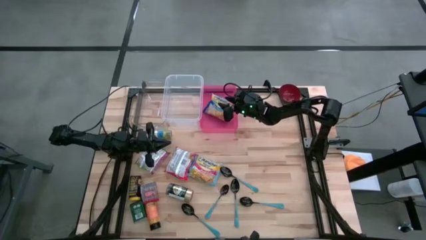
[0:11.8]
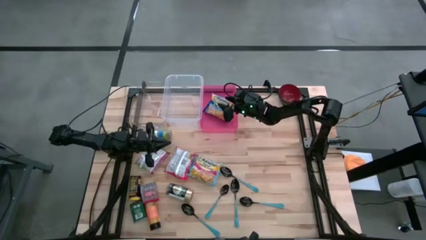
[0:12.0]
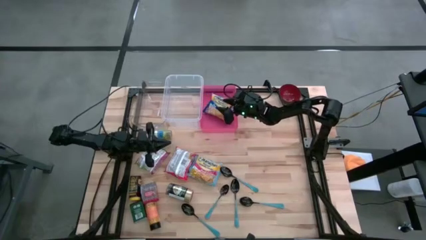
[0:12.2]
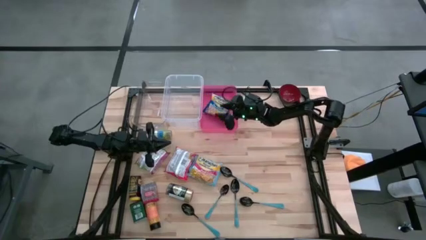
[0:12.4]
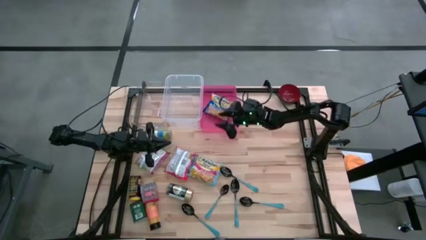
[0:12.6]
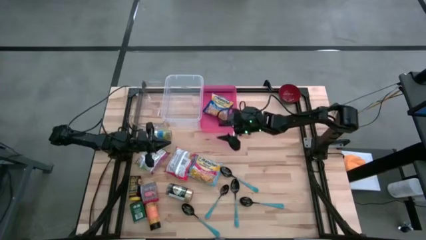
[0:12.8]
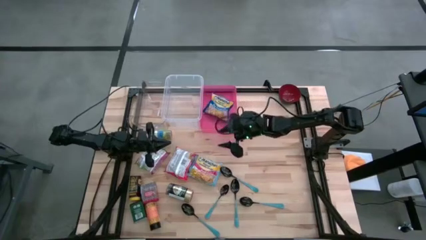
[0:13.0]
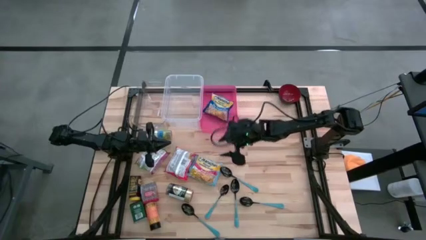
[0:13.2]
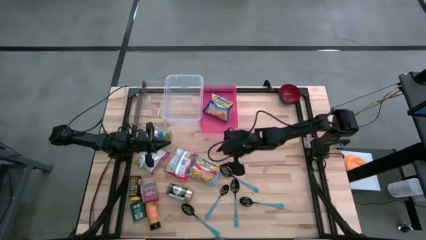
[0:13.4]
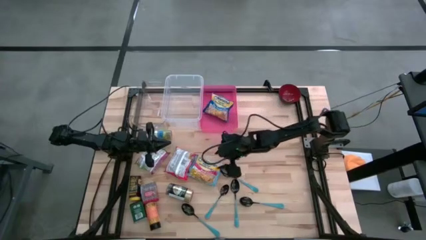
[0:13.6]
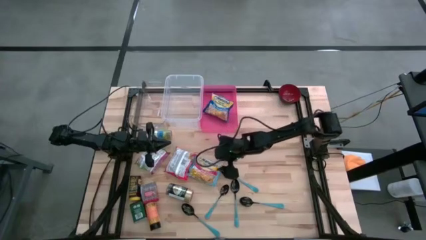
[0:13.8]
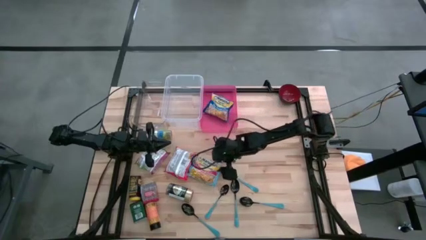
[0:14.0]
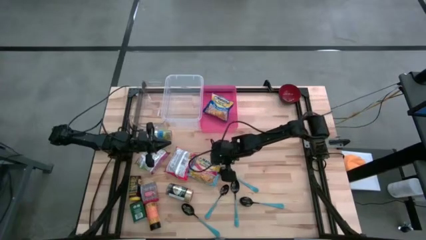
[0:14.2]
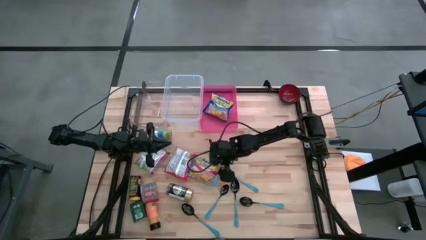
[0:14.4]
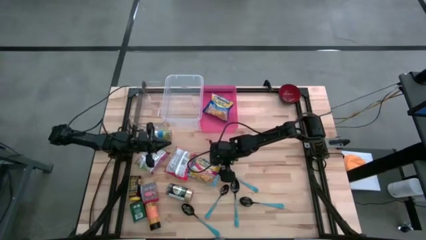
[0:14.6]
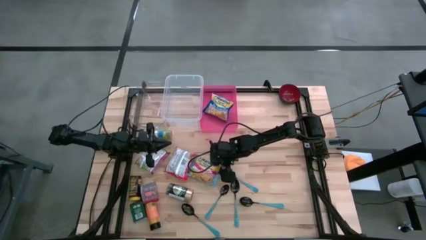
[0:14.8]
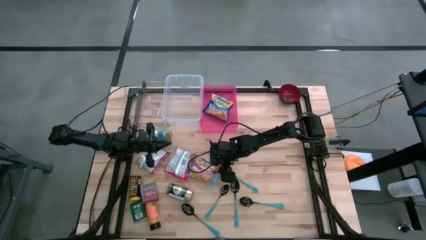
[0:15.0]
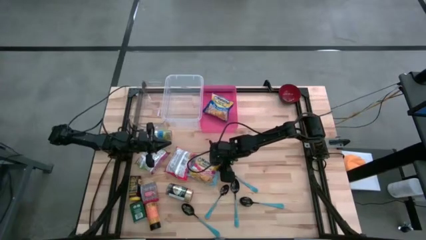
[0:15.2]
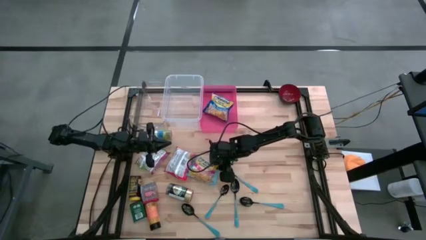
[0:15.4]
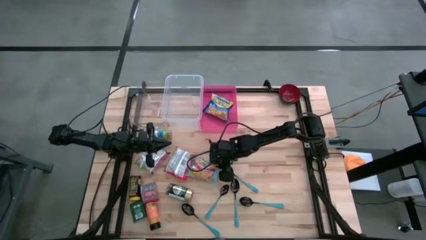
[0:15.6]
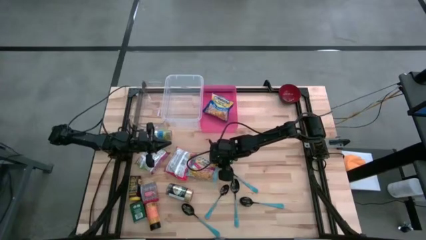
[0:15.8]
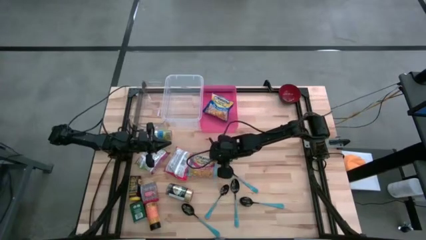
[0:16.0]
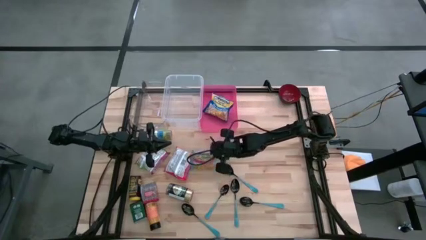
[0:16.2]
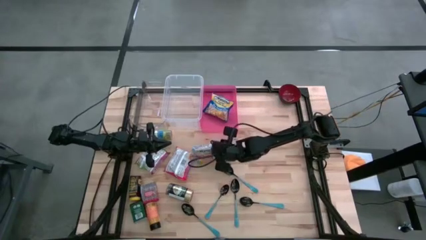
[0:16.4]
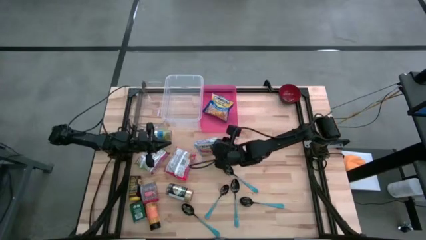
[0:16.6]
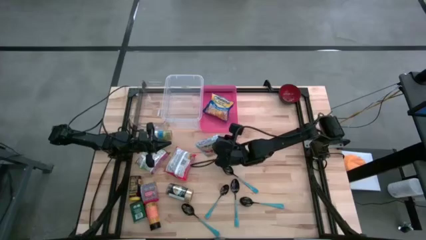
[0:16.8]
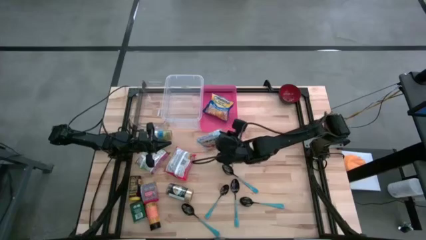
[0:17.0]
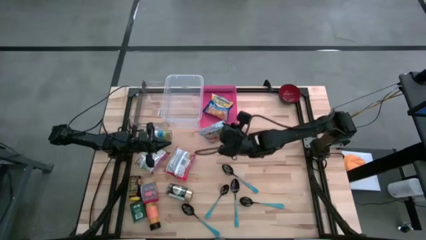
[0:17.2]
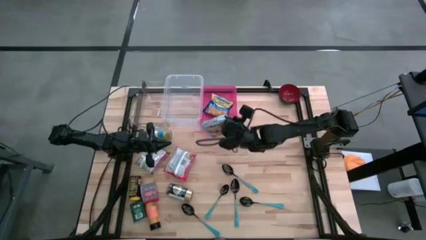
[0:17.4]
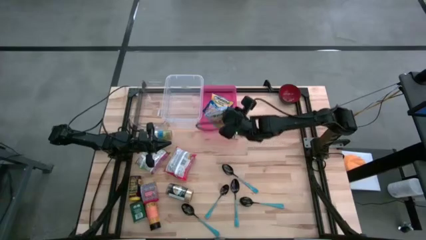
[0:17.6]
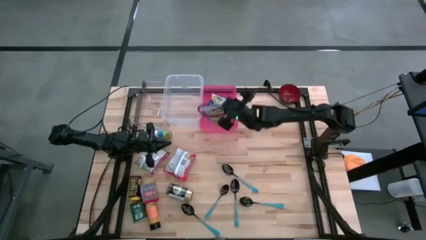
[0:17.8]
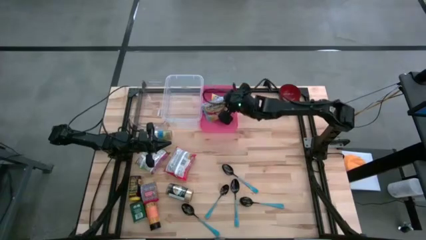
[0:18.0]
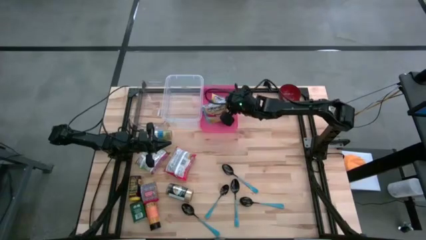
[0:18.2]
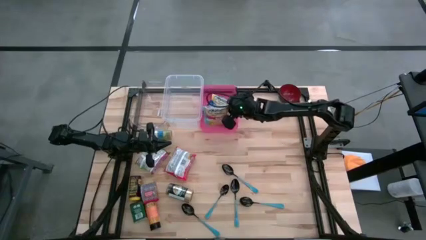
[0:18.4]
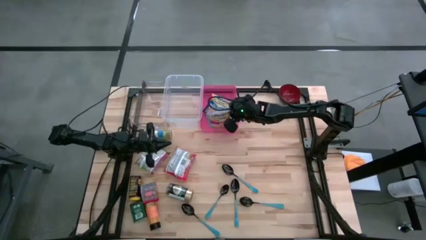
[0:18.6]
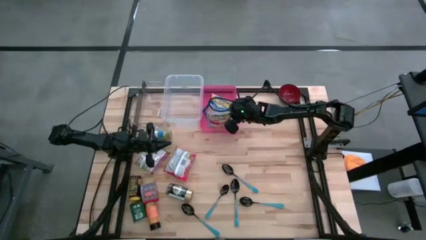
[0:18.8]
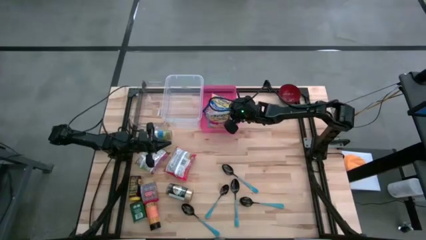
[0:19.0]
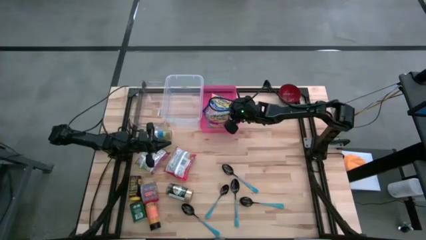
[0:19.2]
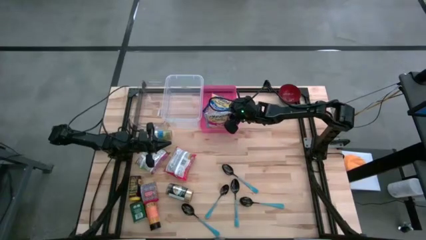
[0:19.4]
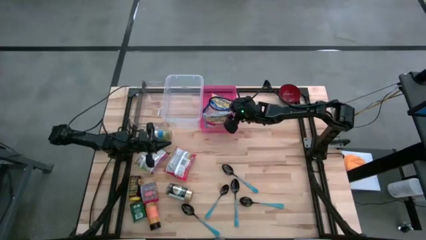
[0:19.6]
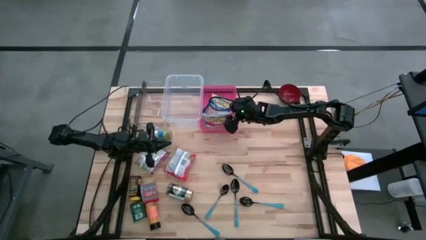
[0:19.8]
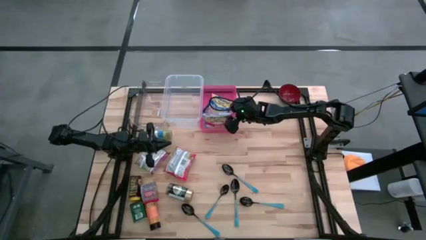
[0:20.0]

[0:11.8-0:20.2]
Put the light blue noodle pack into the pink bin

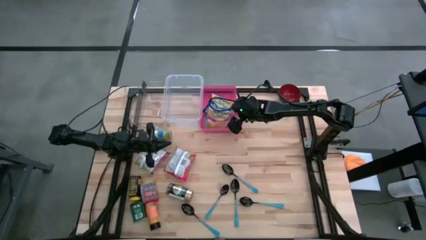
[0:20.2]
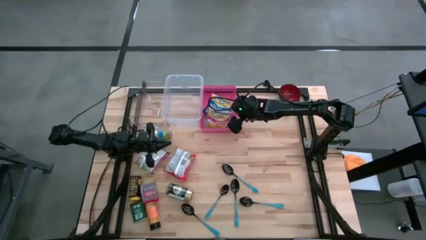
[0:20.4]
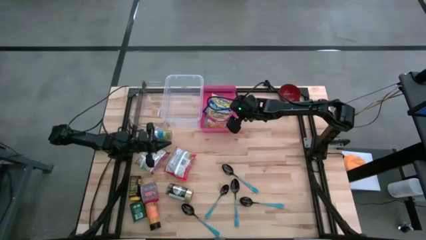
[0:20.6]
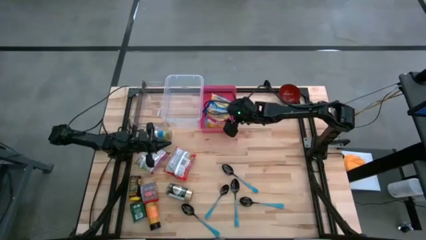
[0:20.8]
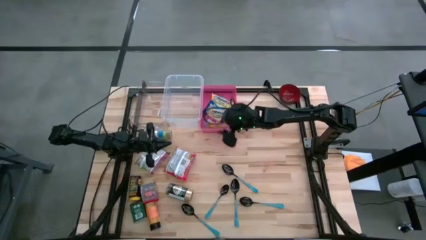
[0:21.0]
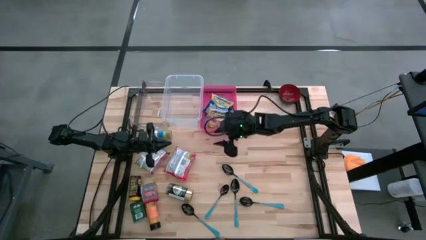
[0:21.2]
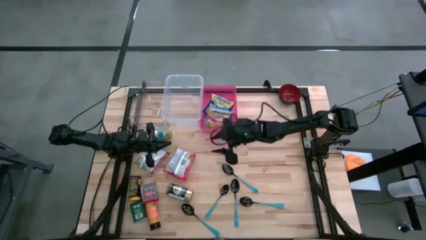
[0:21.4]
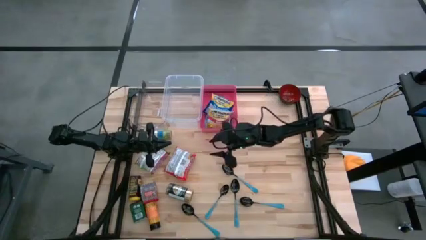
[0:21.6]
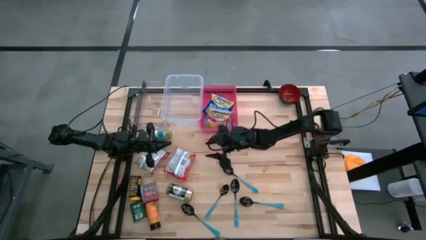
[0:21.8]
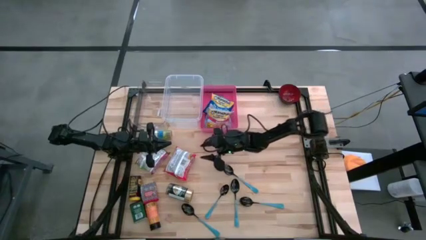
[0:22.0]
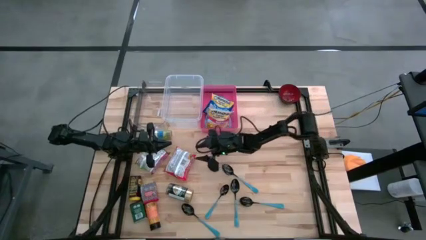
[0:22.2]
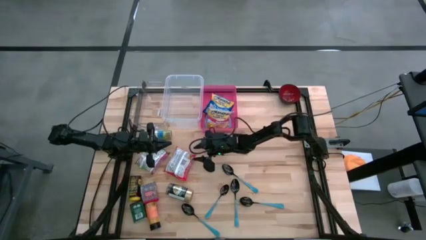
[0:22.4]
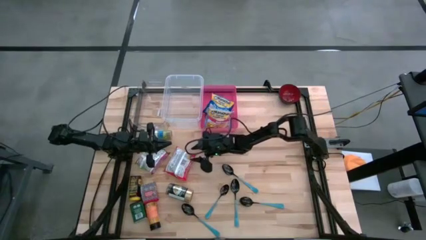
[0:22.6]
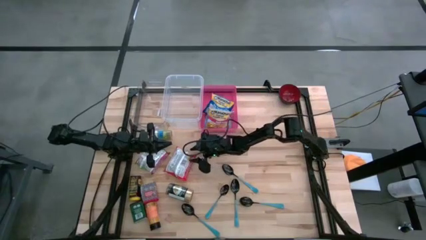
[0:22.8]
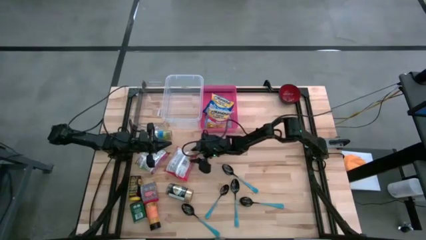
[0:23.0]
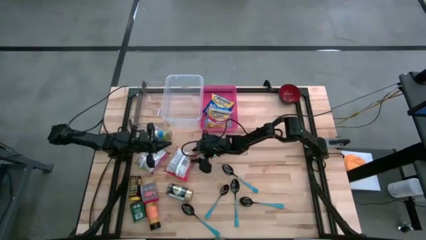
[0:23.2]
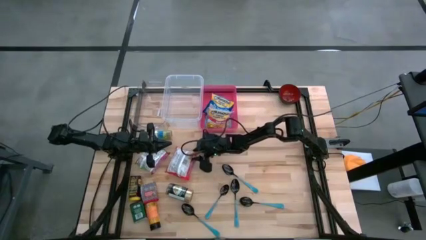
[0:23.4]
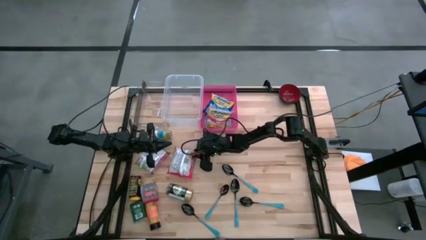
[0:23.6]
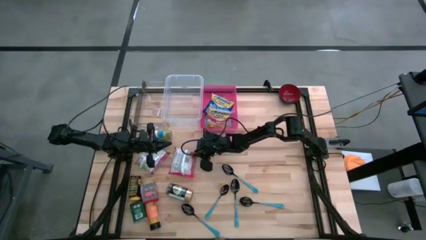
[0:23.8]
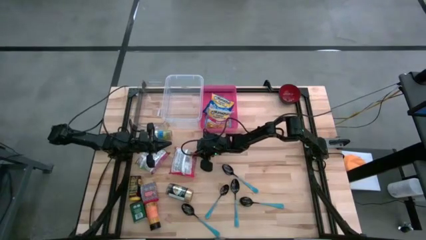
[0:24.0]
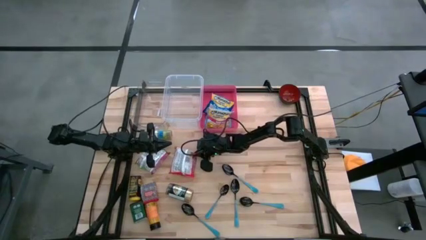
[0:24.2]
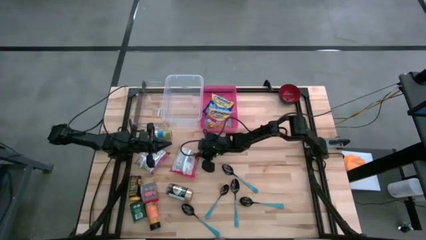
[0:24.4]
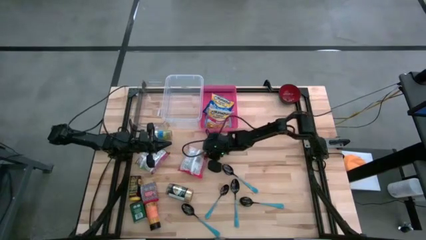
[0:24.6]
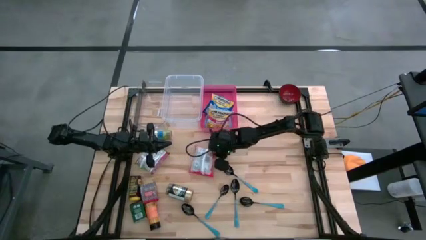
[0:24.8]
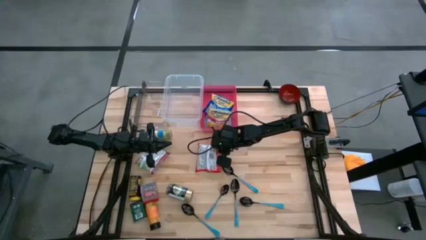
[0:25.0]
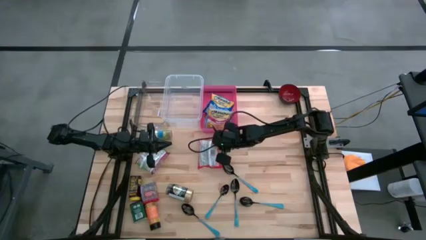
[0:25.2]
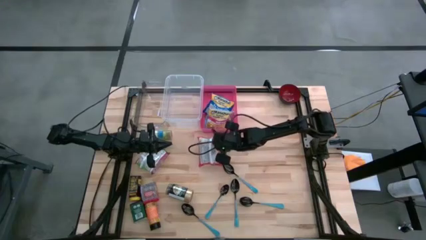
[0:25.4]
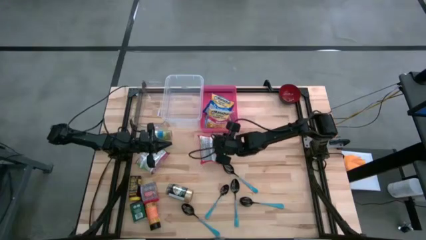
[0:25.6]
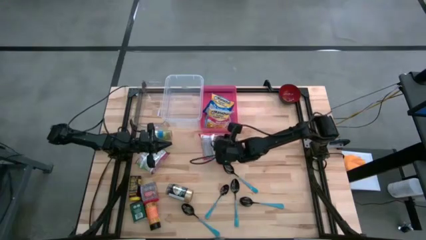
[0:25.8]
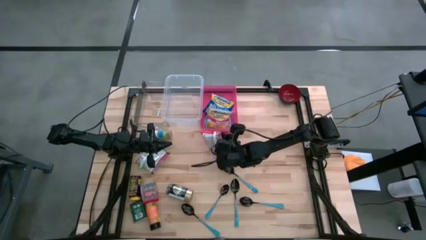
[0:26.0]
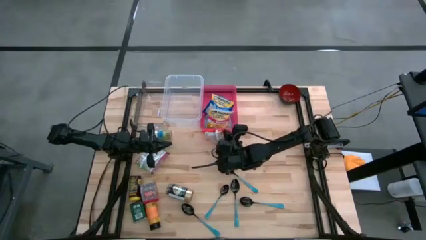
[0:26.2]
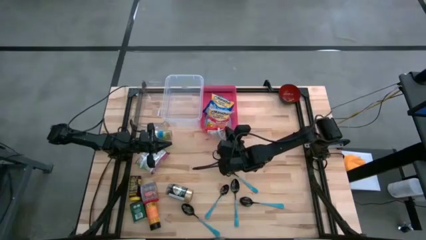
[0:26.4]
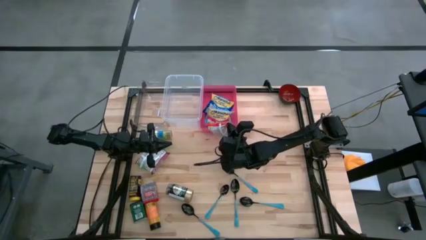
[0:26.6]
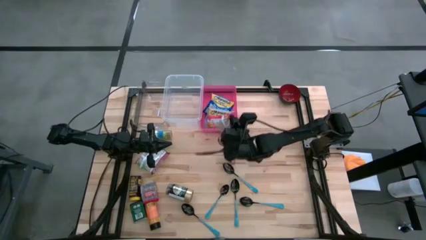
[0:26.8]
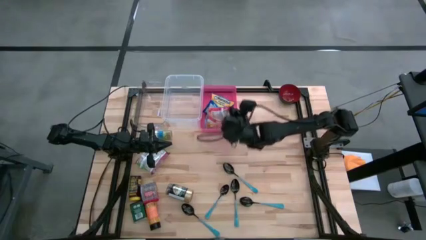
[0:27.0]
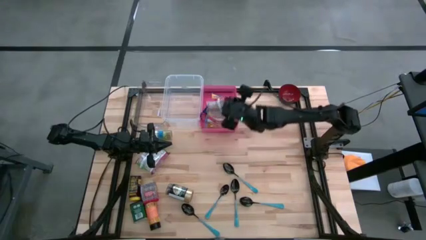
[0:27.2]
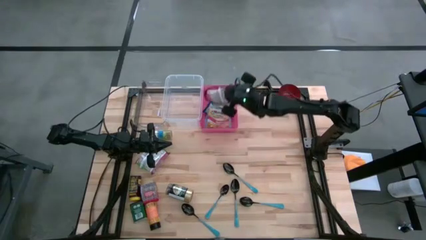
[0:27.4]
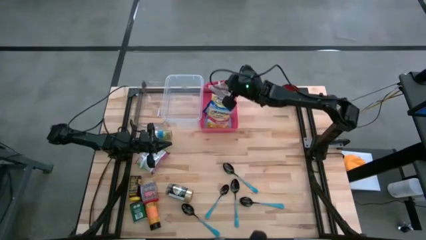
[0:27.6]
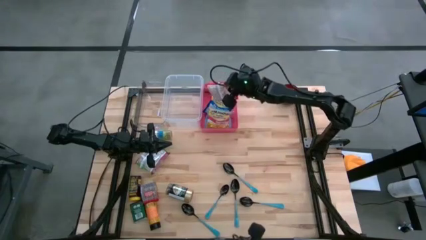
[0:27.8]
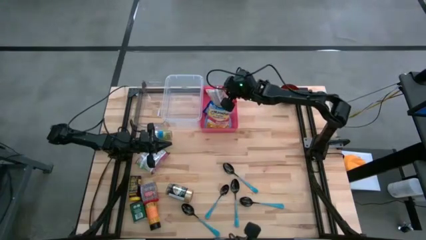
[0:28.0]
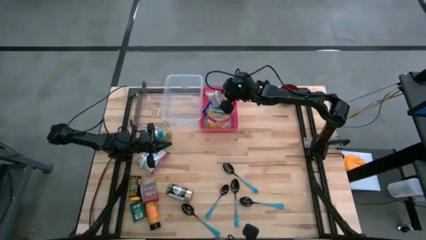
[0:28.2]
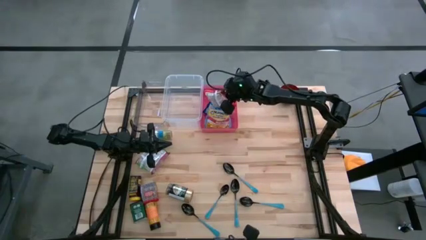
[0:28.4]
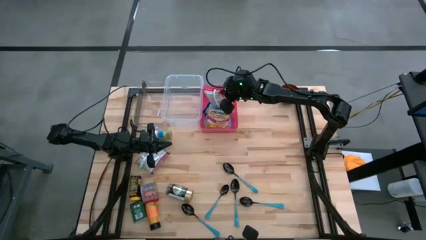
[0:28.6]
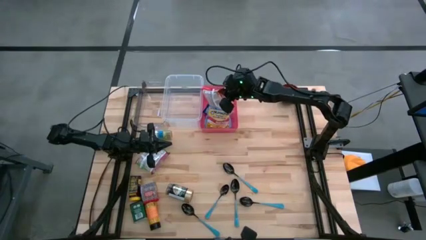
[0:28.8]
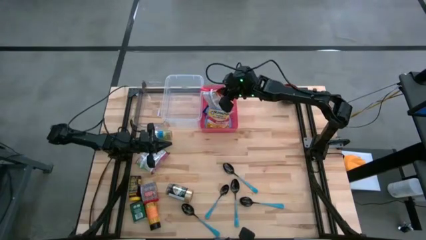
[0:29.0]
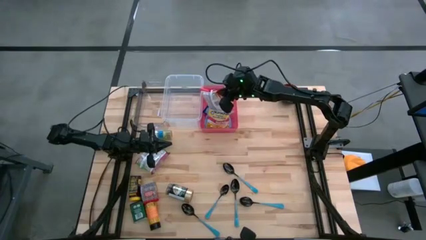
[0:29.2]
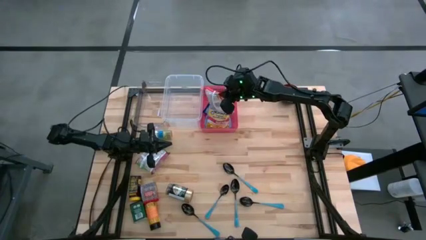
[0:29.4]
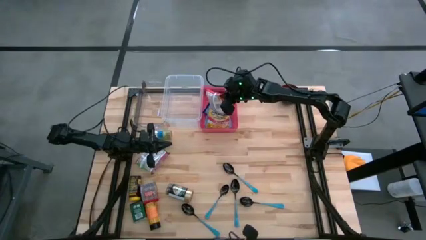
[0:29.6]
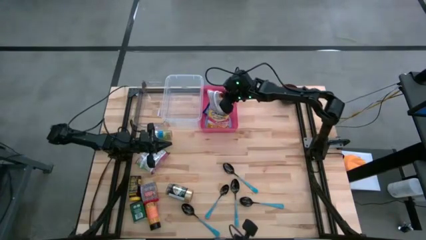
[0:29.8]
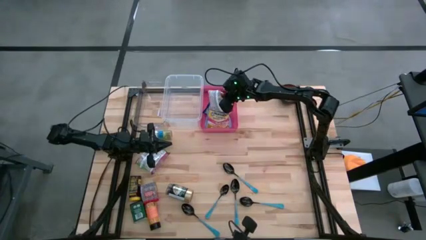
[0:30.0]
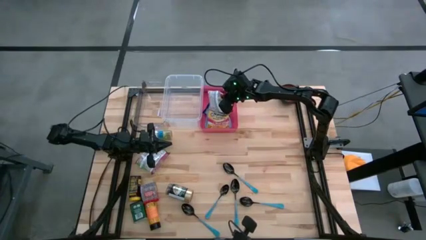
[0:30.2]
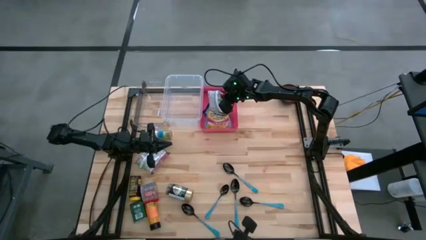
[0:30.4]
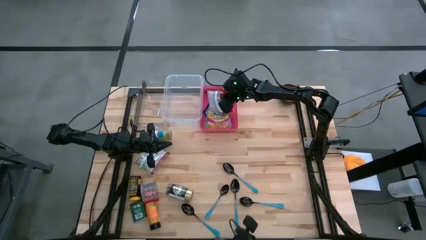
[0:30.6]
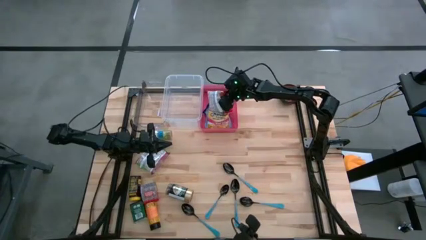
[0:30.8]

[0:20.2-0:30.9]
Put the red noodle pack into the pink bin
